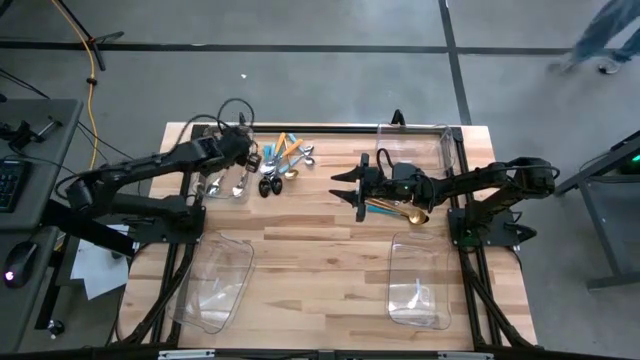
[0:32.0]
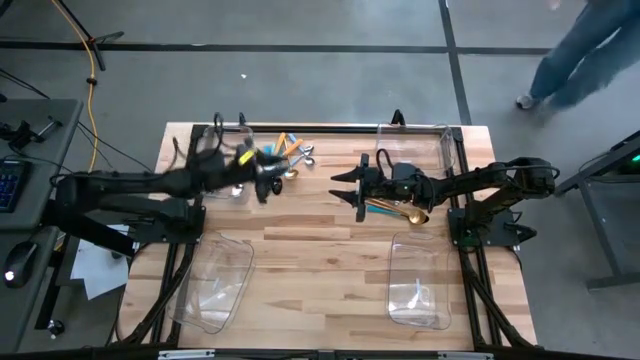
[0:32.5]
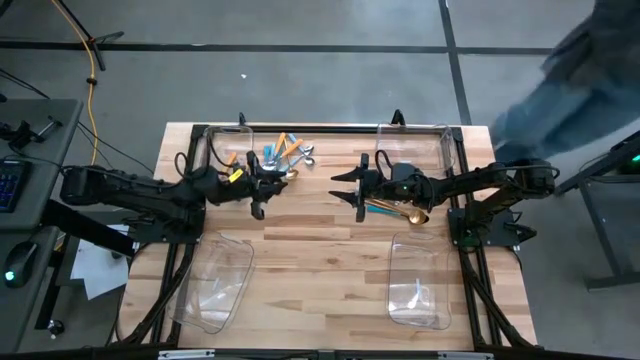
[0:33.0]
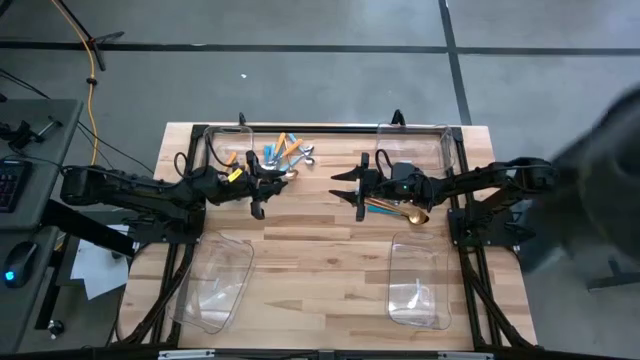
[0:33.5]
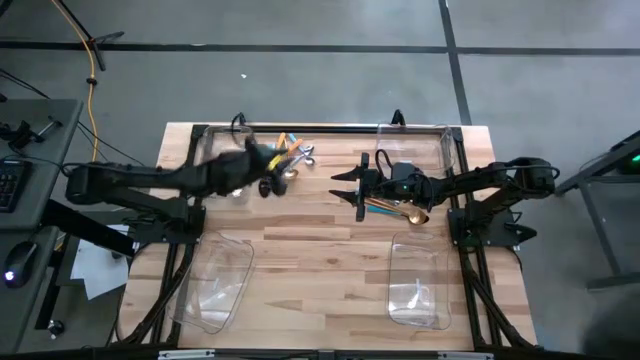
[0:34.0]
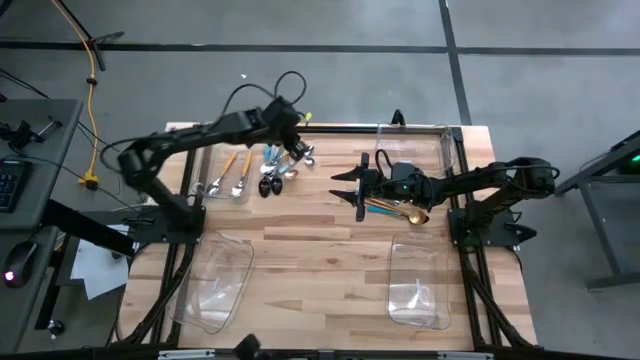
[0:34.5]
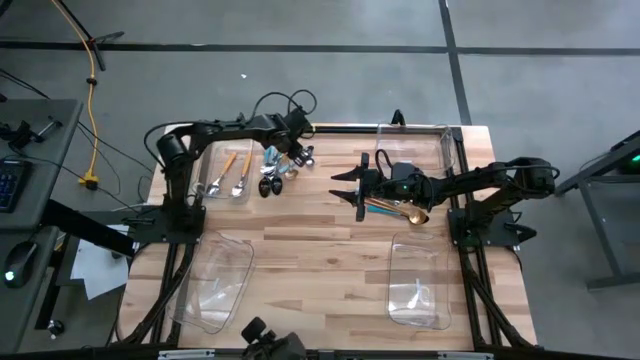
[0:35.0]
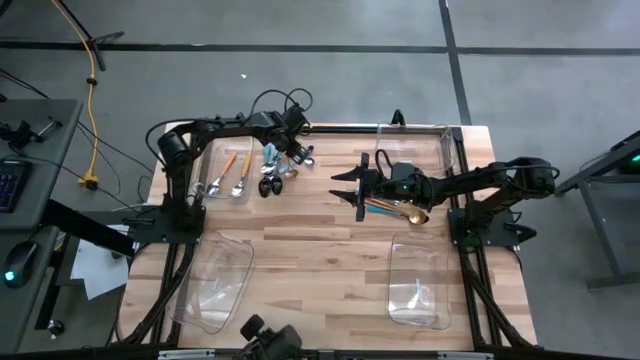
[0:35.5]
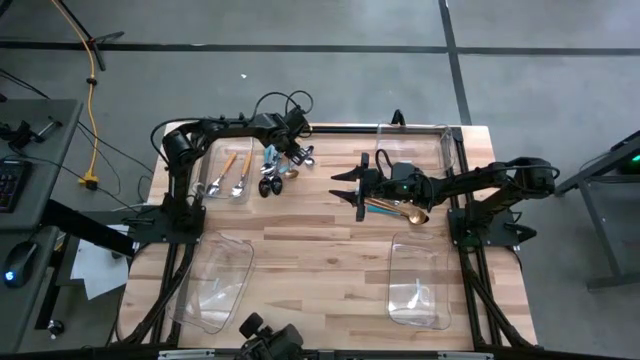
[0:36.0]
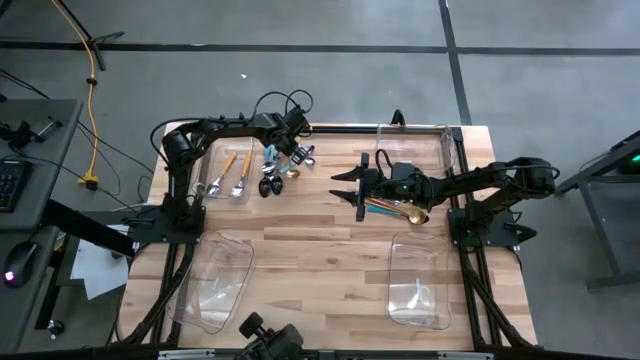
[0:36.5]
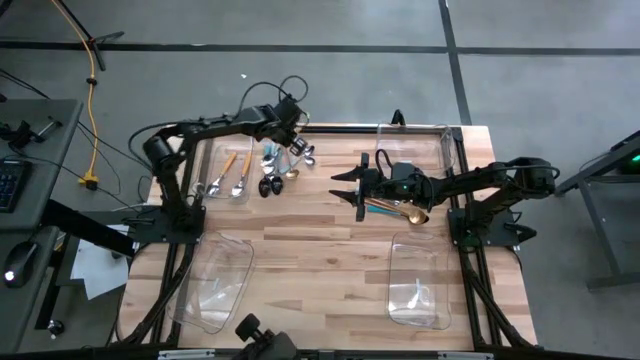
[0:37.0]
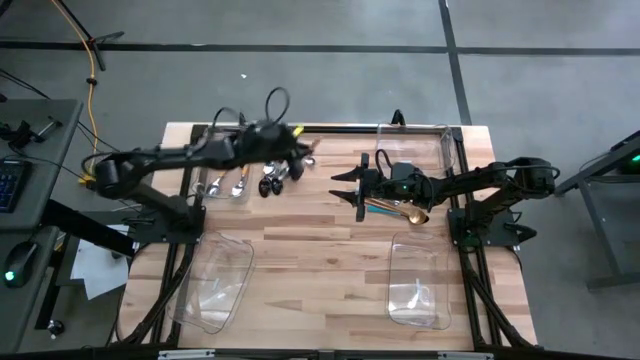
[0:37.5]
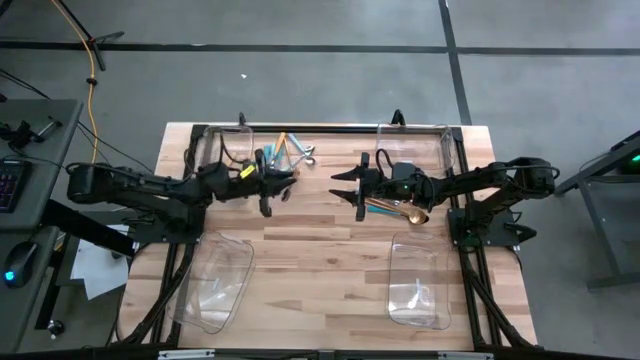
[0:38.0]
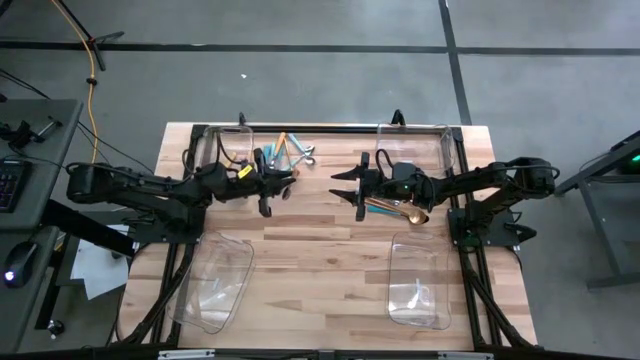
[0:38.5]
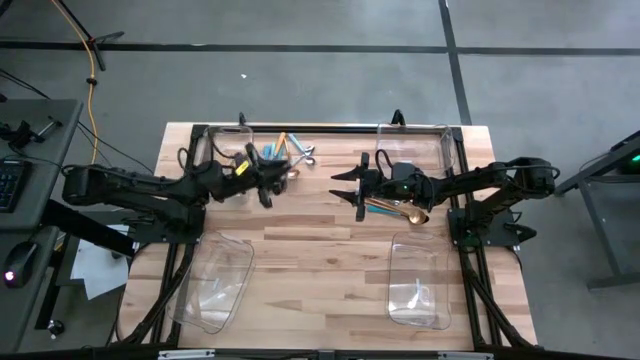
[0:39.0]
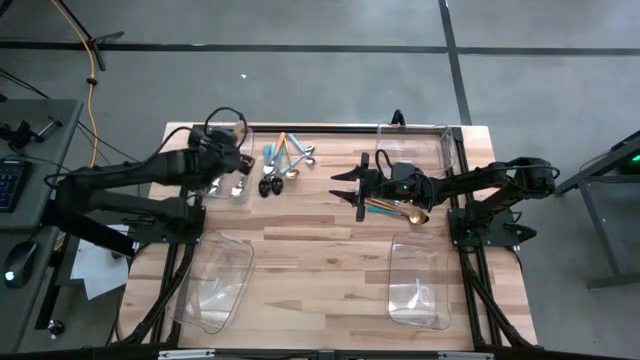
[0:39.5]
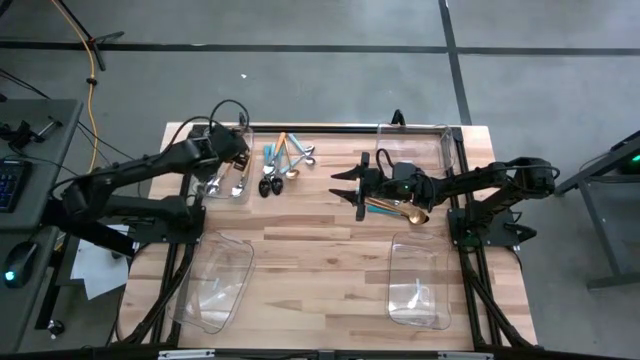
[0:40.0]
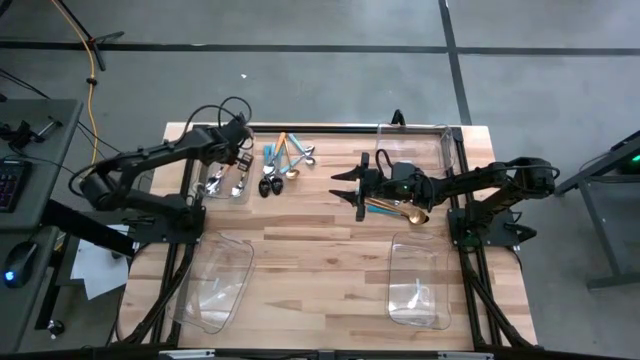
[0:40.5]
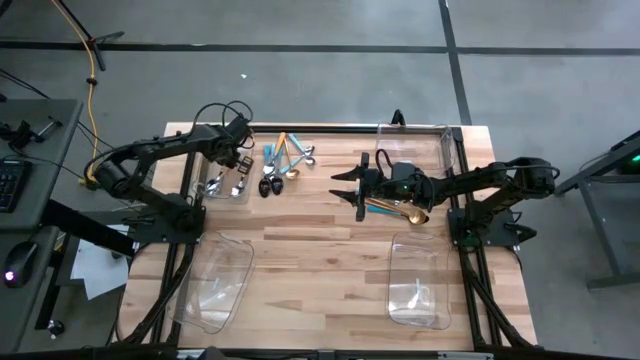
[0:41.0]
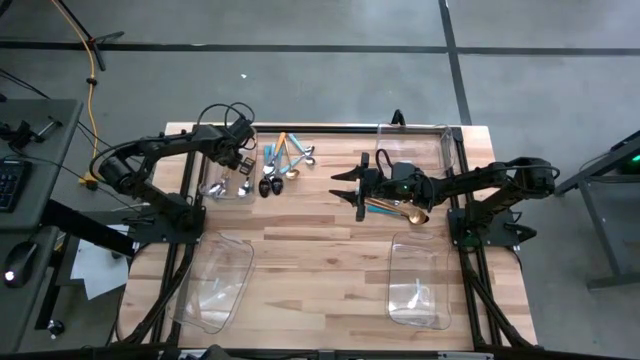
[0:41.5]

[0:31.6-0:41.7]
Task: Sort silverware by color (type)
Put the yellow spoon into the top left transparent bin

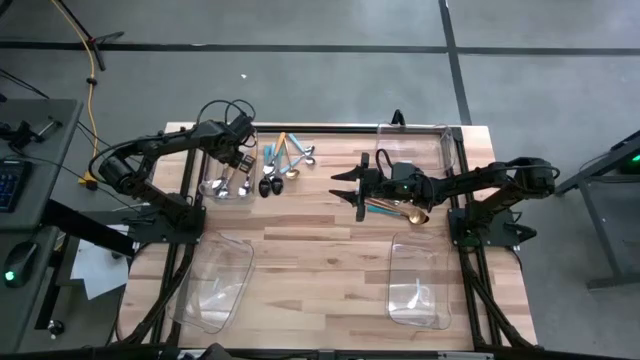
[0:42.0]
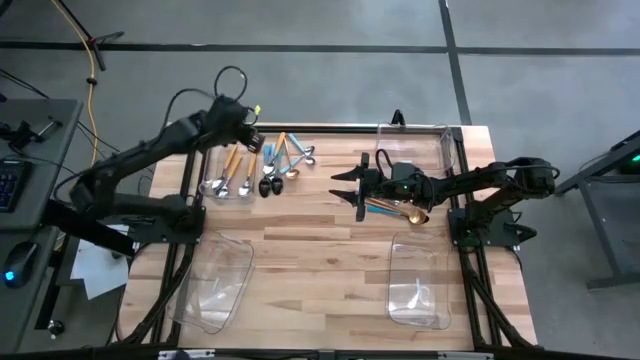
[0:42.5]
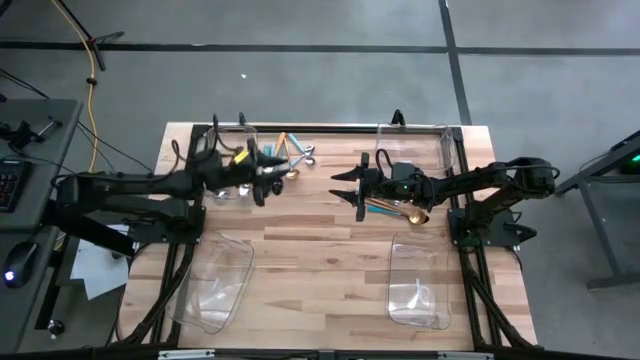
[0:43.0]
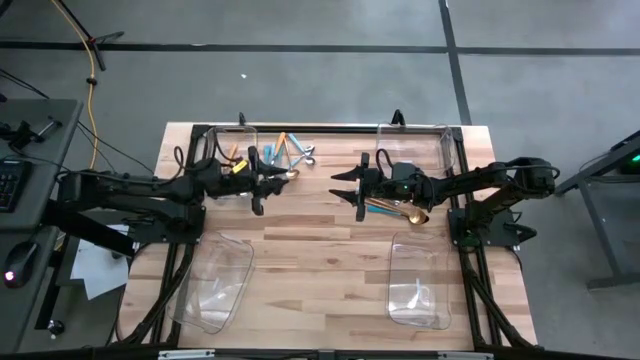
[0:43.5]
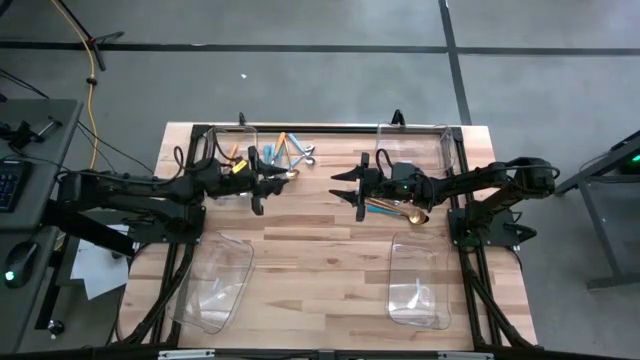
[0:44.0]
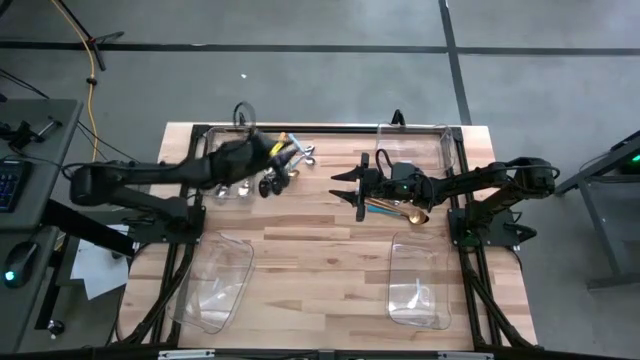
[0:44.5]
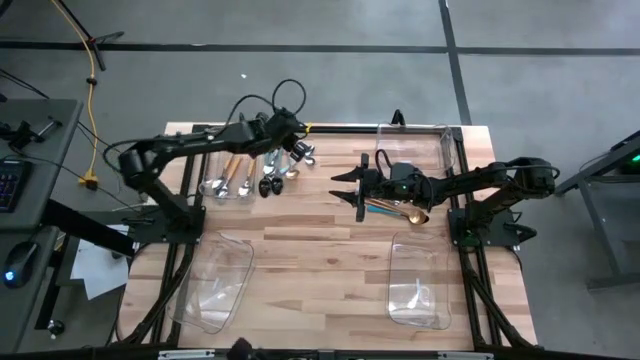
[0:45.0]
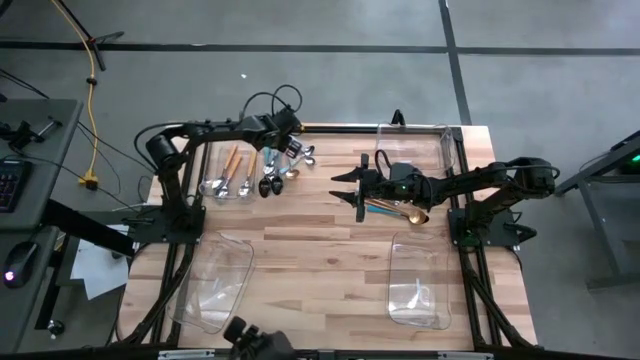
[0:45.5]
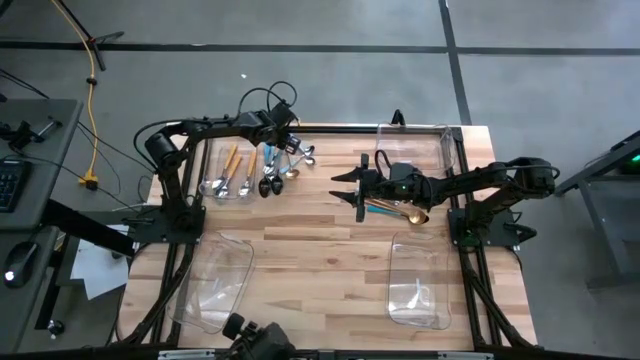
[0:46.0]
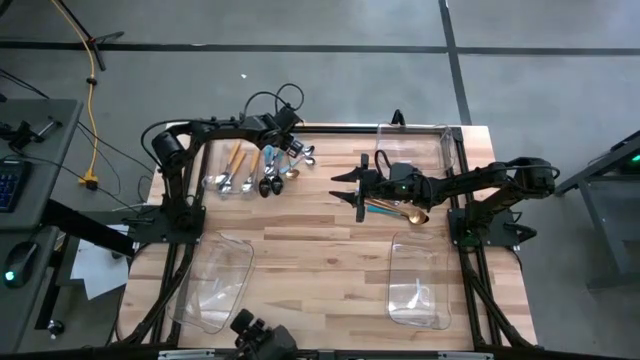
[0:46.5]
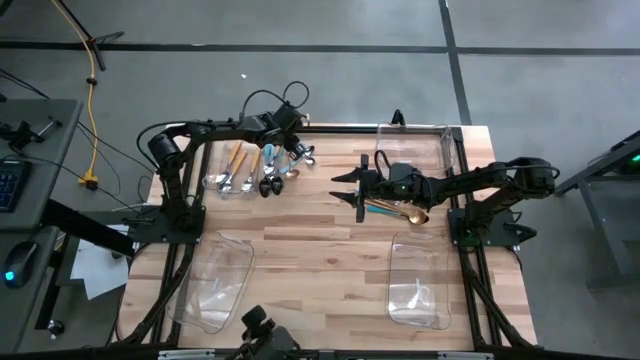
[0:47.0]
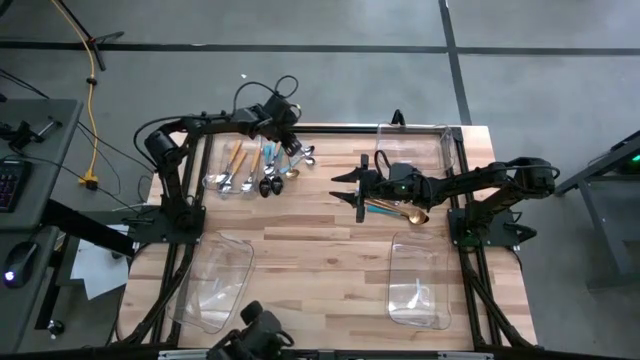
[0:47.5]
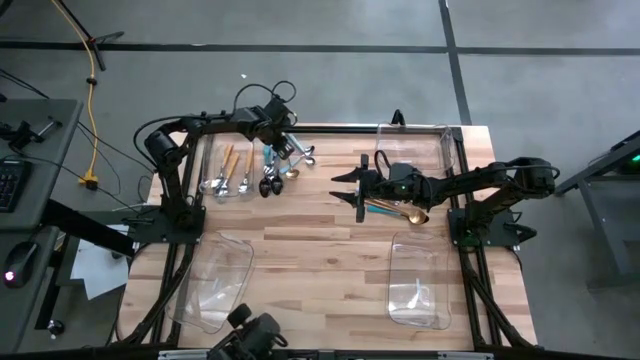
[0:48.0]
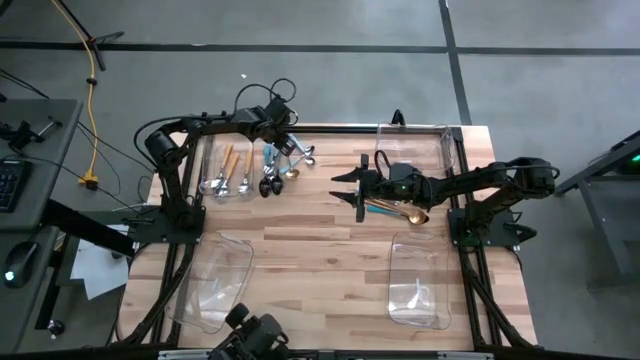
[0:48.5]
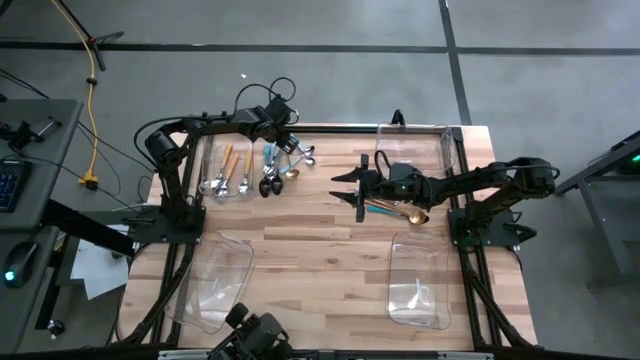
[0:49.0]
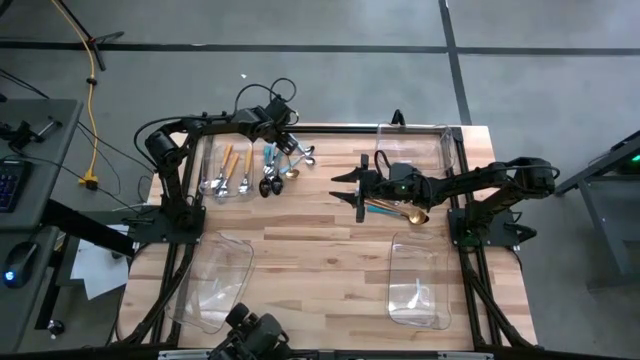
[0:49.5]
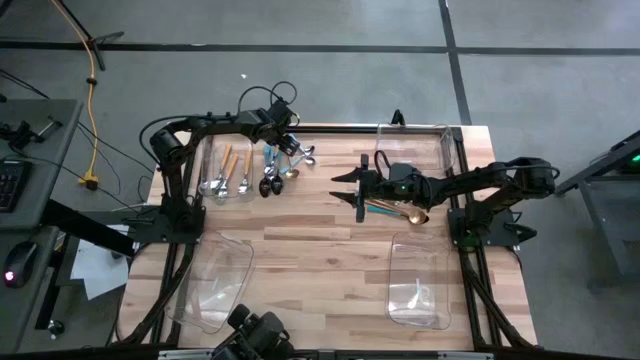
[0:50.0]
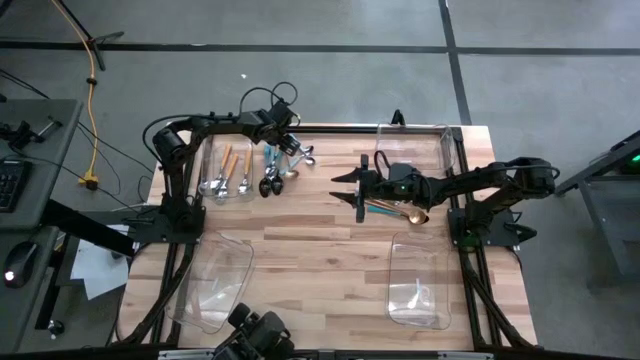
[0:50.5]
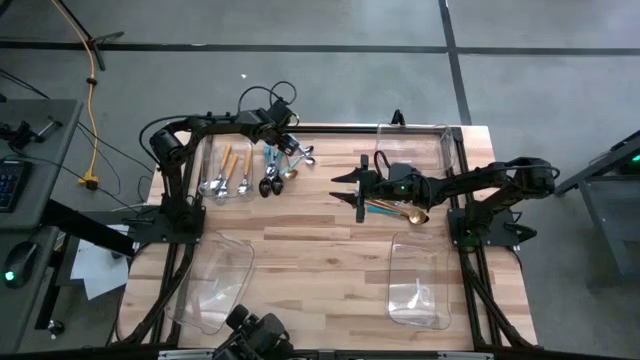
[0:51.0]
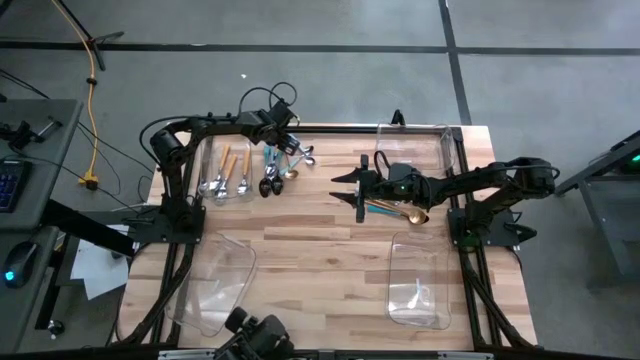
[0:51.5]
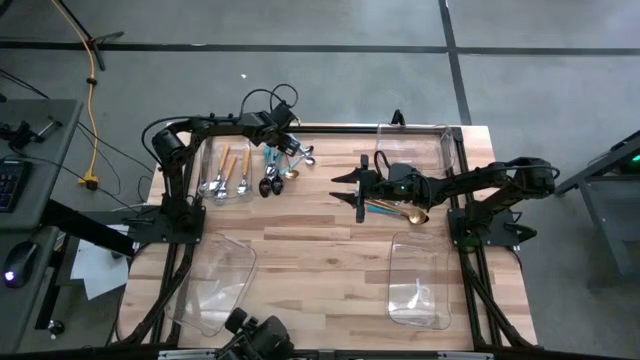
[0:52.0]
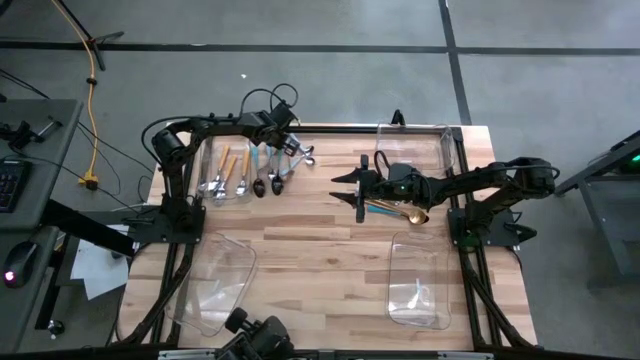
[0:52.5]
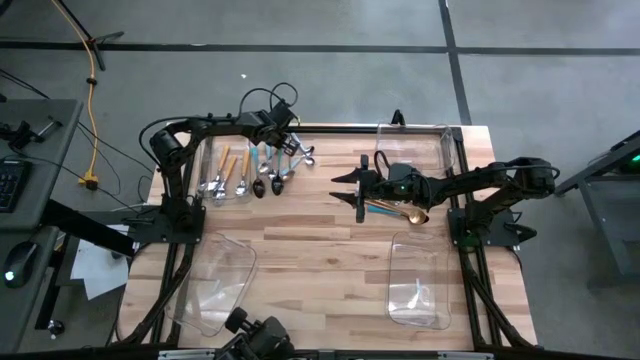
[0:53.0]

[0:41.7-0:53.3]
Put the yellow spoon into the top left transparent bin
